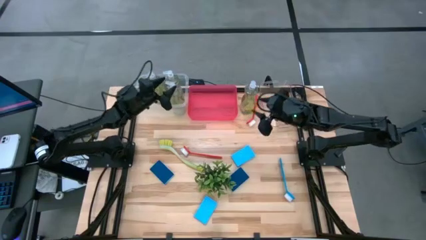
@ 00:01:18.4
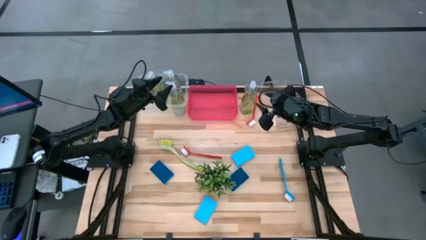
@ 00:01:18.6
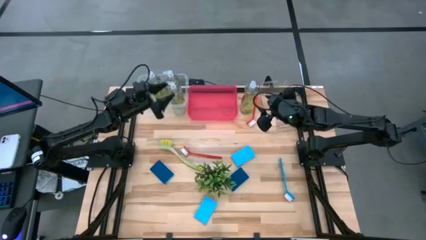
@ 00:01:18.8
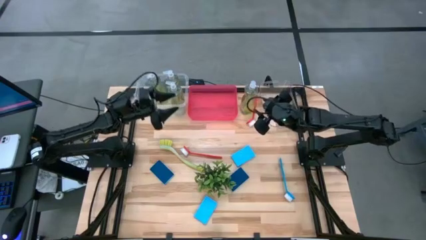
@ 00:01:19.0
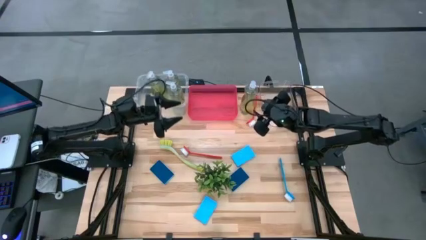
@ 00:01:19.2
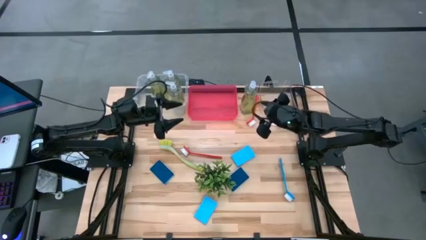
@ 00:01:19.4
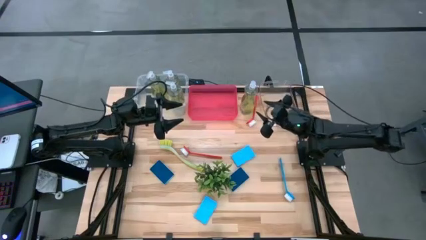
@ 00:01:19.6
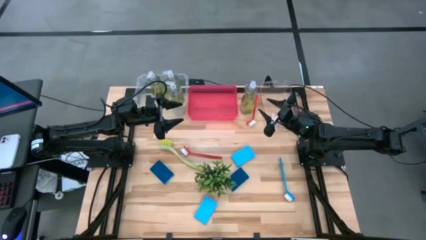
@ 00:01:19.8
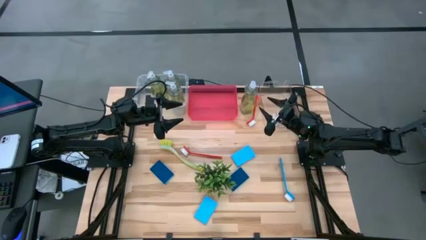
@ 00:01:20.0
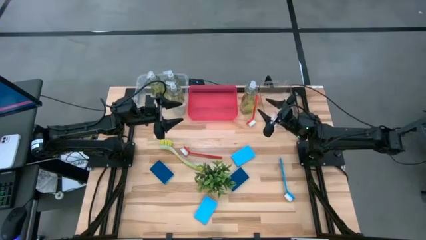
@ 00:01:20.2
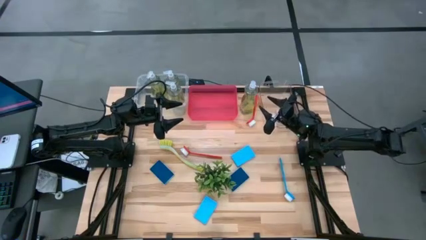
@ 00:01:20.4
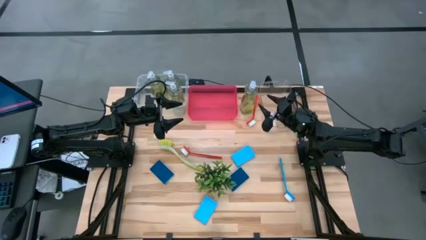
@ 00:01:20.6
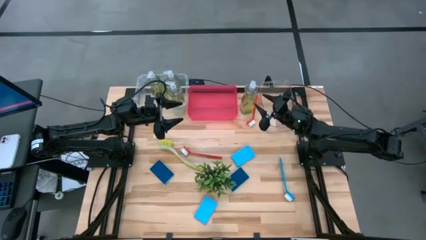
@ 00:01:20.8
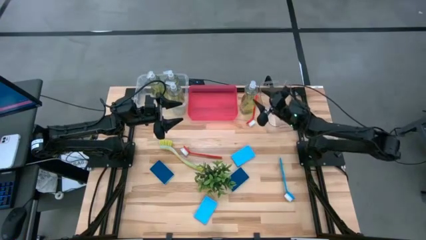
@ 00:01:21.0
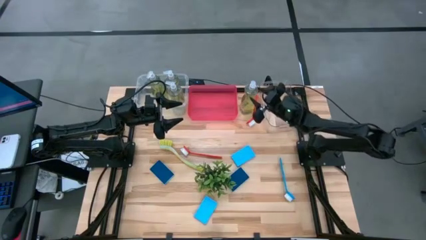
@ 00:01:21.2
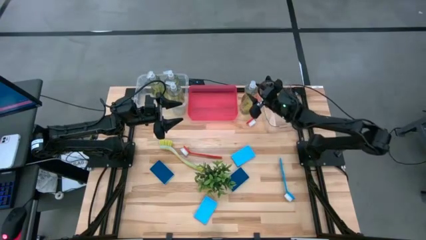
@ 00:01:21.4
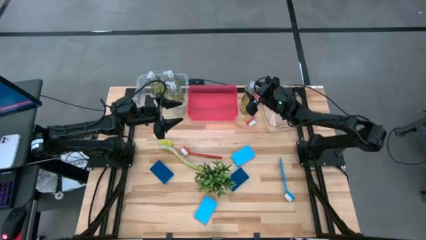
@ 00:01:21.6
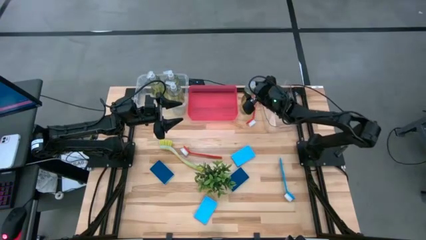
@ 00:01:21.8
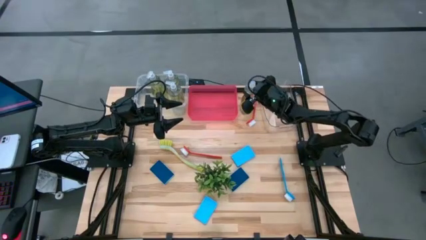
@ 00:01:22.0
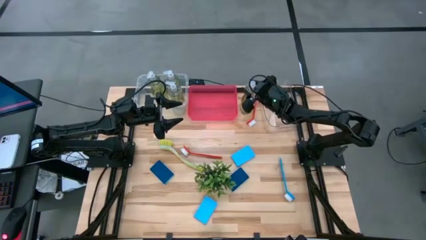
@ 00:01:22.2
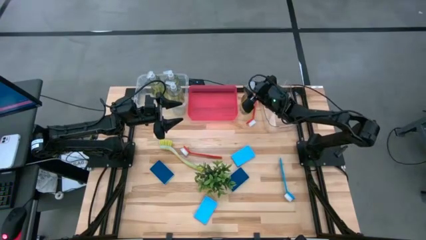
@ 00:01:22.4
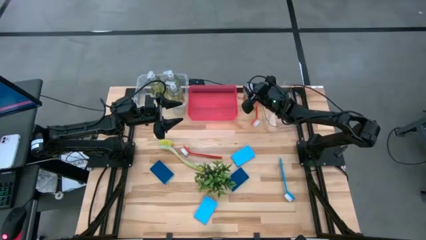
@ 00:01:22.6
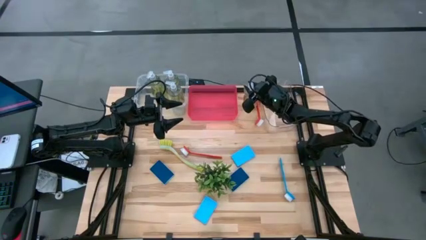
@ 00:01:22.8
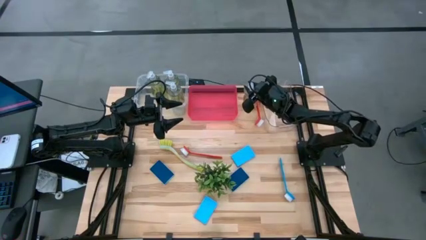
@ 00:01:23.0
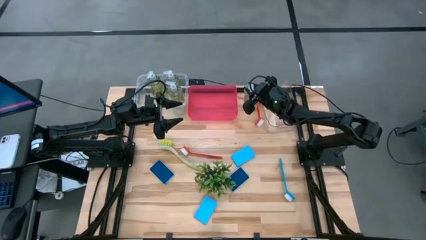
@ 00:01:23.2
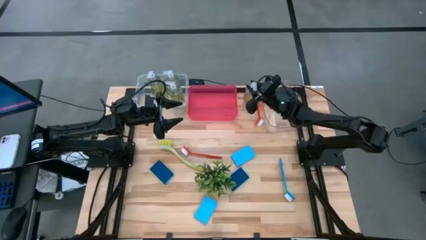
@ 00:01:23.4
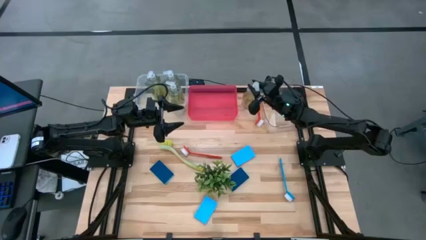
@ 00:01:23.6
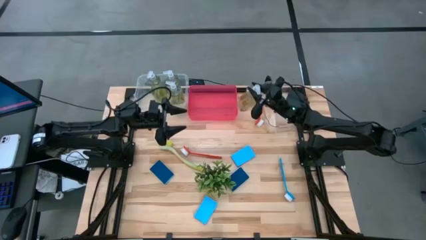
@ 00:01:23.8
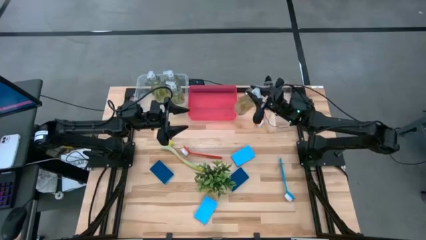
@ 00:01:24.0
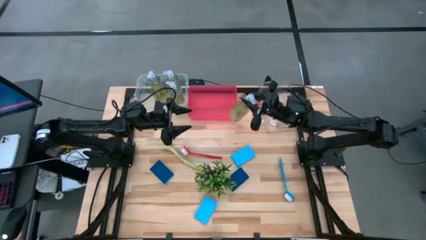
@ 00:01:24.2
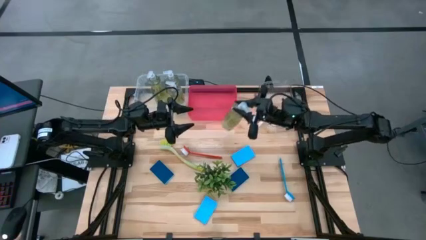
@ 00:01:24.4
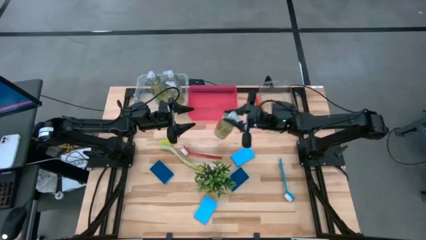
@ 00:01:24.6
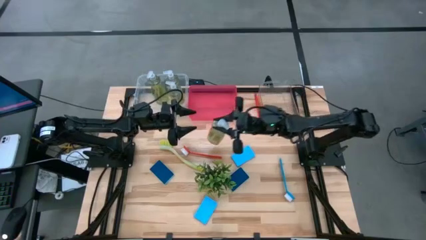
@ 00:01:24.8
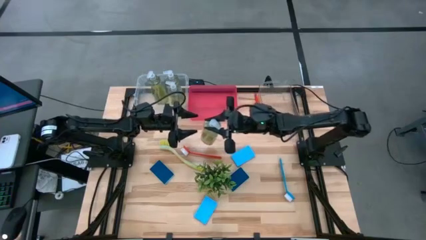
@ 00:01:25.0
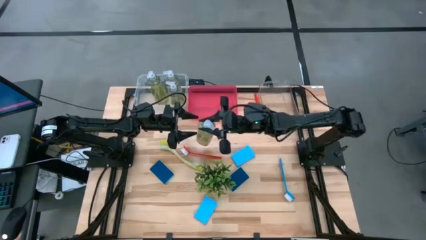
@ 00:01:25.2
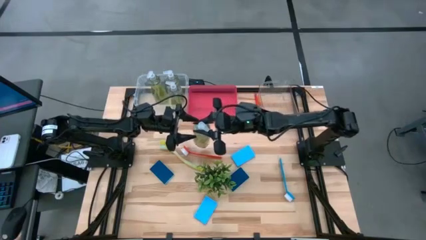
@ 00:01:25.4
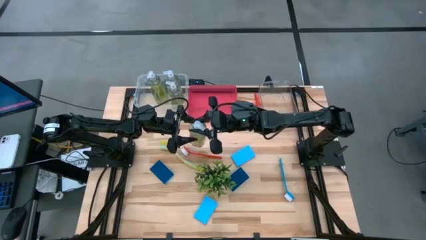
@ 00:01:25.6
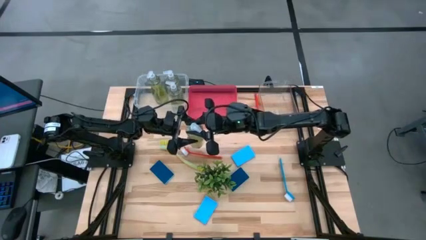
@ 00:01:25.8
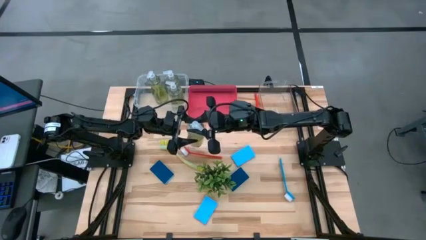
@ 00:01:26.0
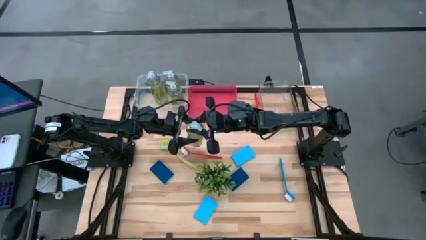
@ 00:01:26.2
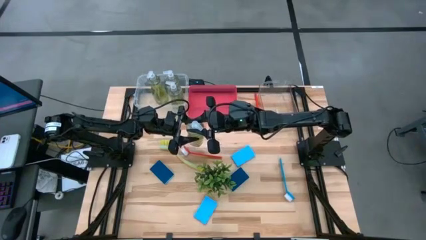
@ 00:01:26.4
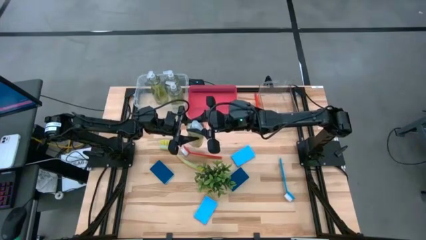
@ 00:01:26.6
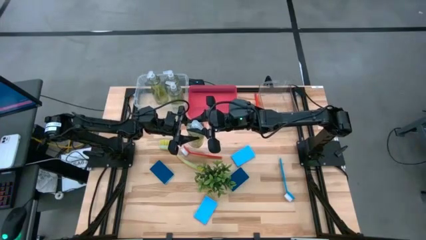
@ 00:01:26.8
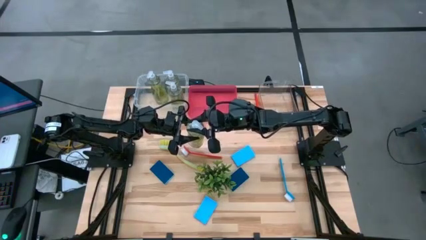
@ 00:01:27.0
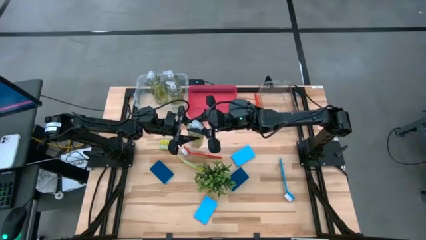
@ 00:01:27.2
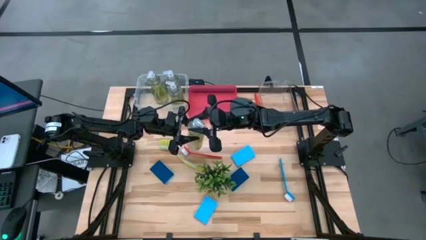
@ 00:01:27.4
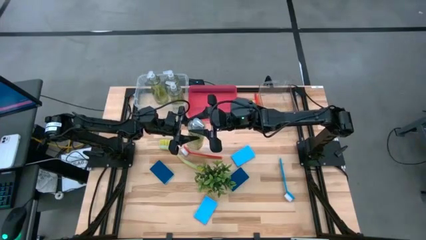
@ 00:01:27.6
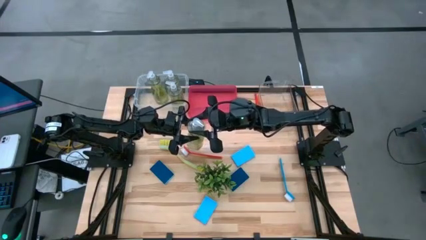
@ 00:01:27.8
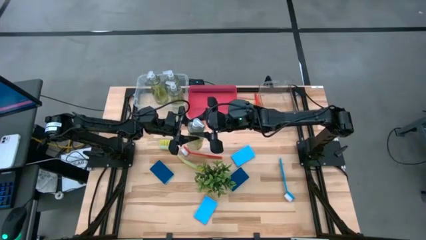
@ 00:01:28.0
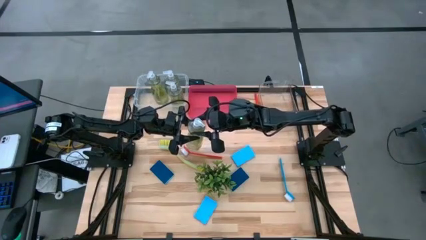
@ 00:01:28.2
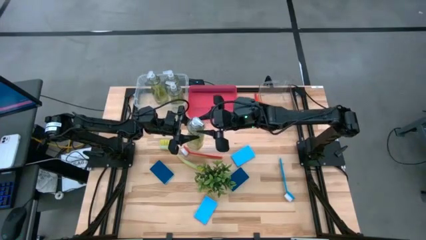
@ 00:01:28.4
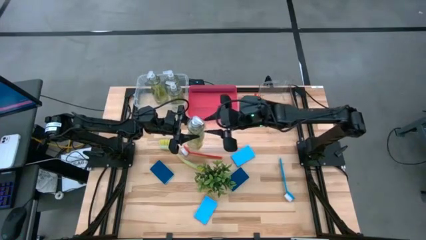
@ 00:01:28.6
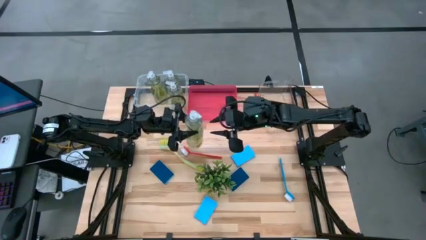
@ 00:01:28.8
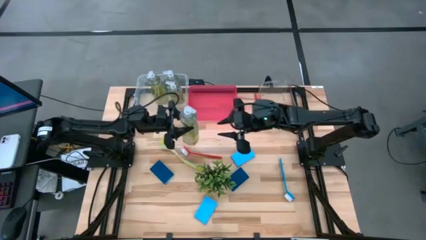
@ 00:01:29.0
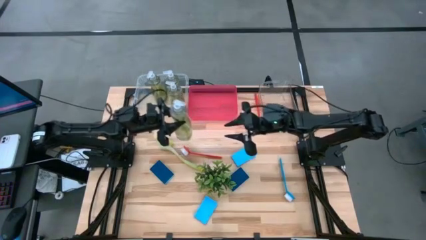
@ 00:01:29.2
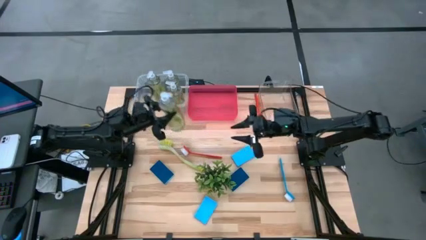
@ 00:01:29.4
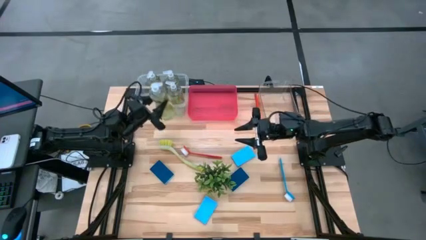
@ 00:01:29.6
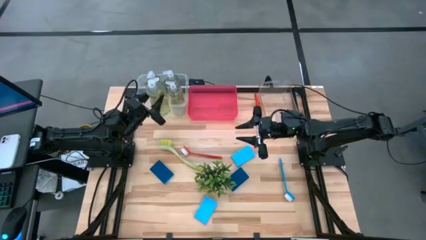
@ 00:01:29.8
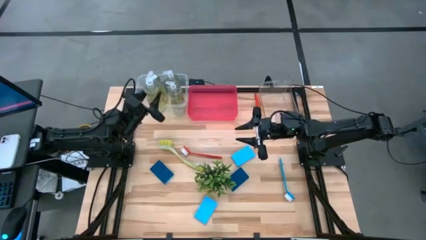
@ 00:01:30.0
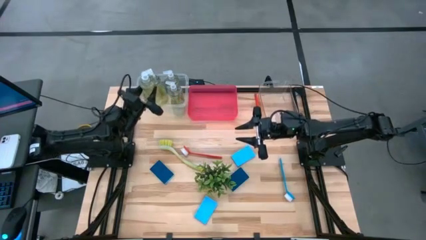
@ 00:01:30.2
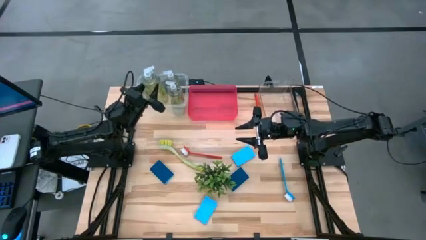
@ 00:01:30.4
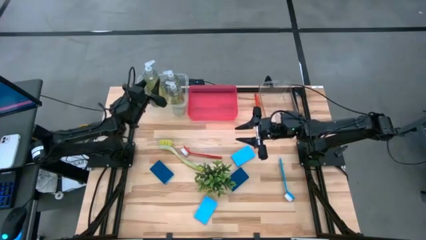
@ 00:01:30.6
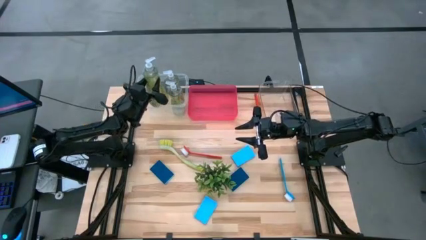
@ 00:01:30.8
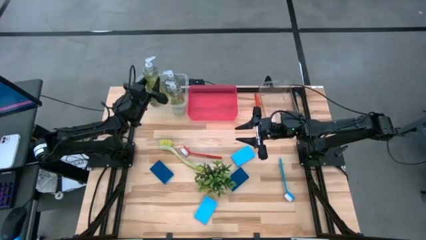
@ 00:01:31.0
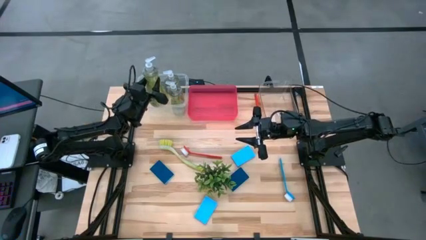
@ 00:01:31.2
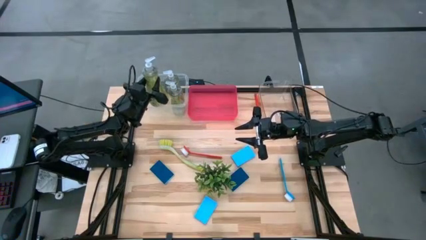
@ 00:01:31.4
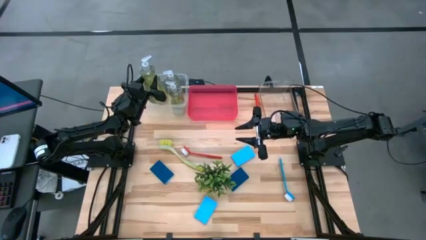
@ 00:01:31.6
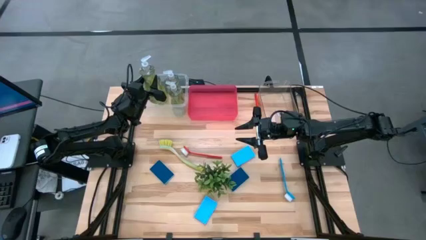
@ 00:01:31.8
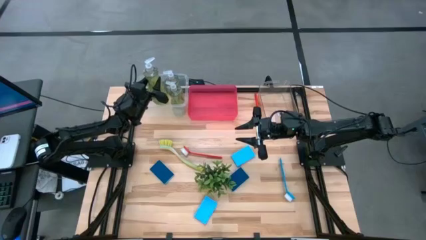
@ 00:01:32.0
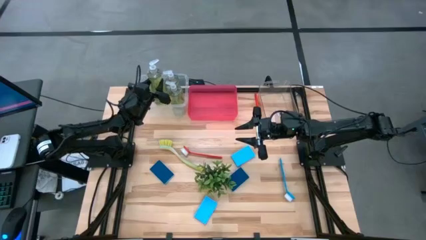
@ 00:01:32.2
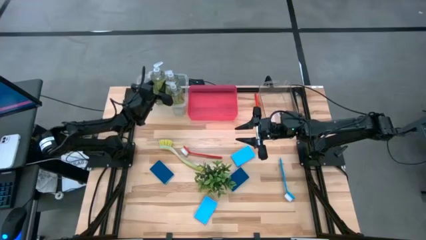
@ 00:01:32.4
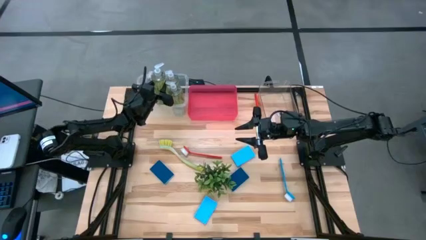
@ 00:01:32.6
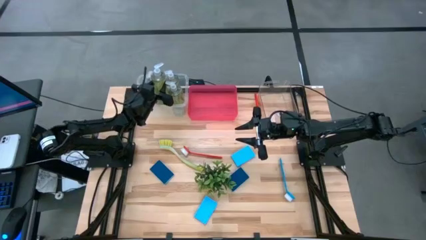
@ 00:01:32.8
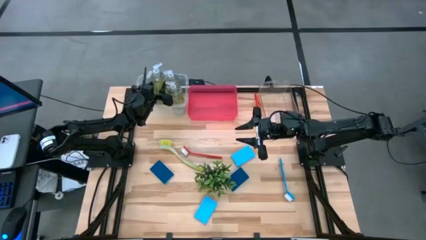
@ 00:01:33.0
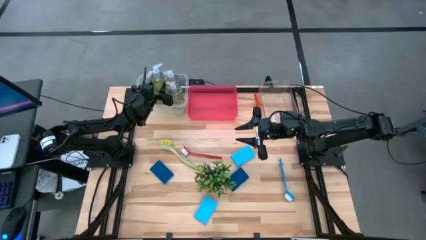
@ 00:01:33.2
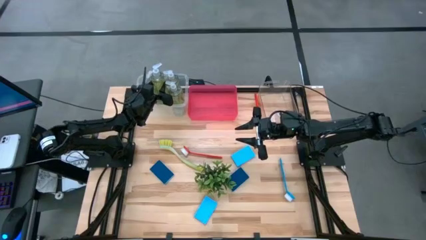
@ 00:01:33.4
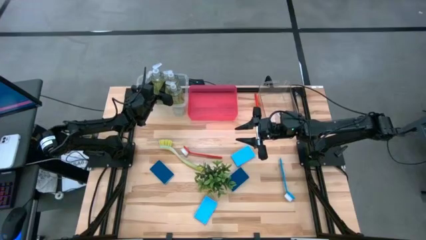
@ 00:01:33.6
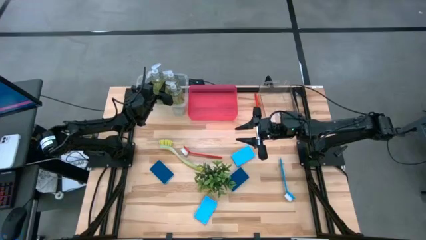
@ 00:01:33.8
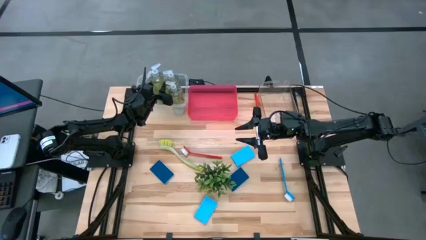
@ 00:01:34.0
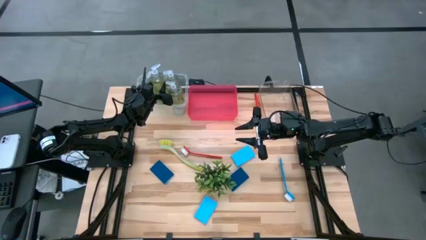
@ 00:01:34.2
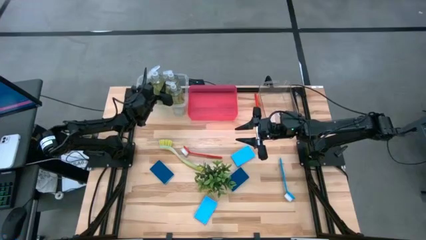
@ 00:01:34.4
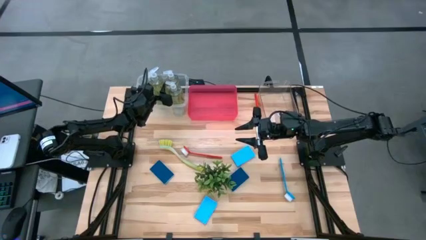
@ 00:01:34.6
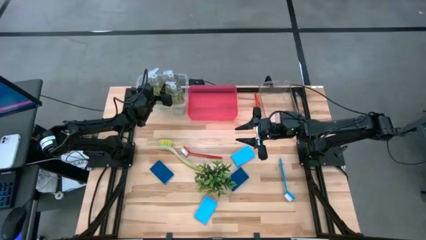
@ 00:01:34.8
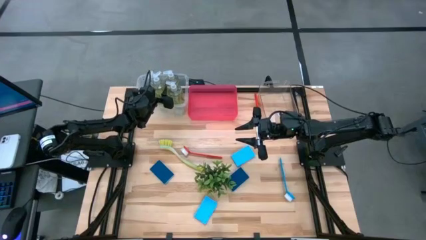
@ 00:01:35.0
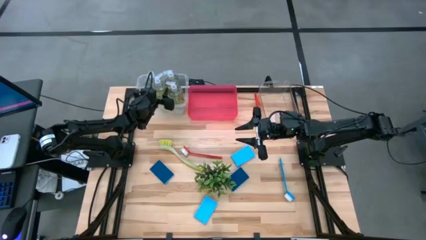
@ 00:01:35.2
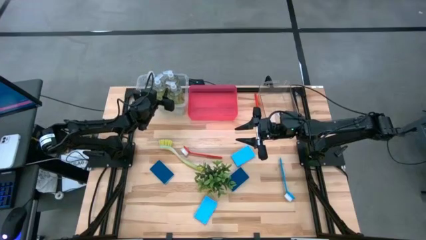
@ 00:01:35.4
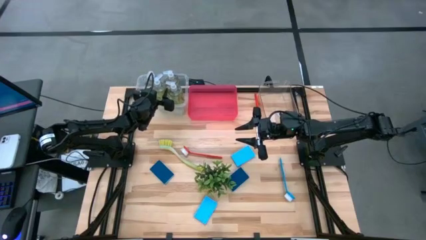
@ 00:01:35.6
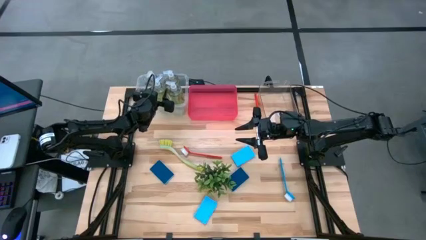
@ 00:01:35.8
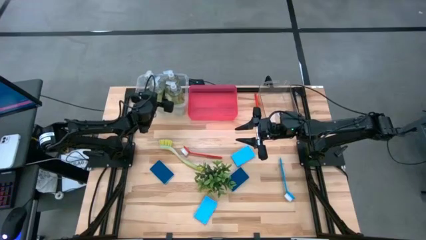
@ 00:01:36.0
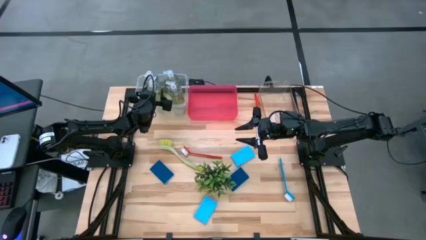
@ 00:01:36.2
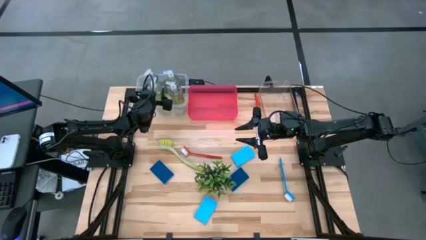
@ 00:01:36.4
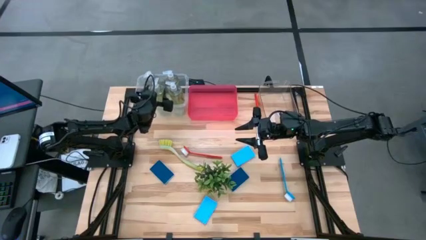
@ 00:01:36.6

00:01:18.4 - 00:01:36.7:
Task: Pick & Place Kitchen Sink Supplies
Put the yellow dishwashing liquid into the white bin
